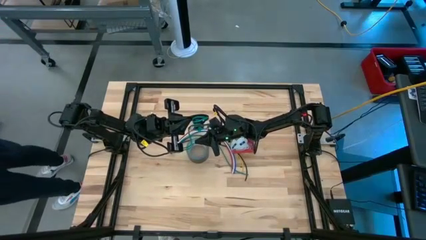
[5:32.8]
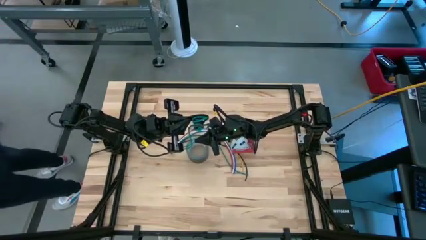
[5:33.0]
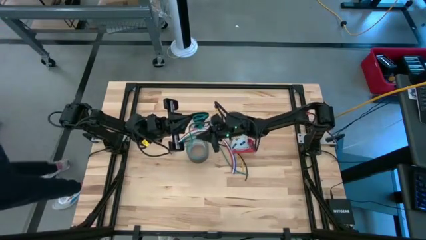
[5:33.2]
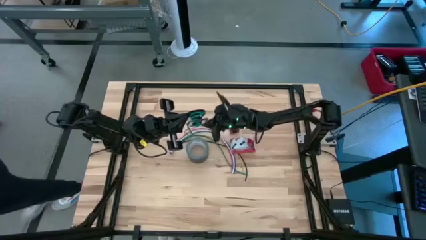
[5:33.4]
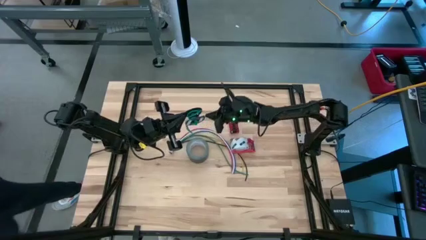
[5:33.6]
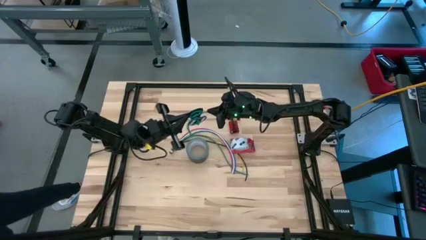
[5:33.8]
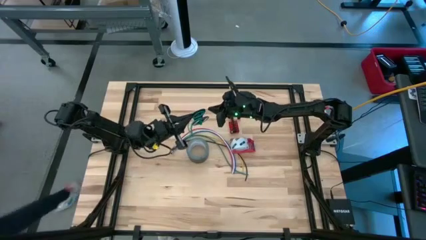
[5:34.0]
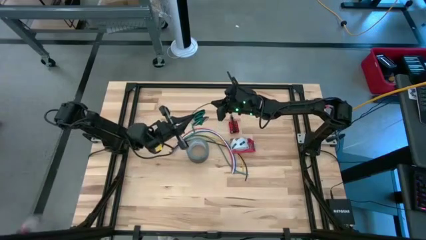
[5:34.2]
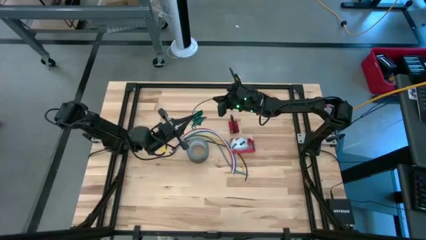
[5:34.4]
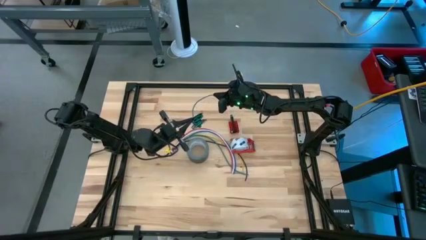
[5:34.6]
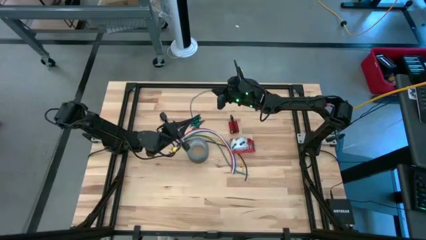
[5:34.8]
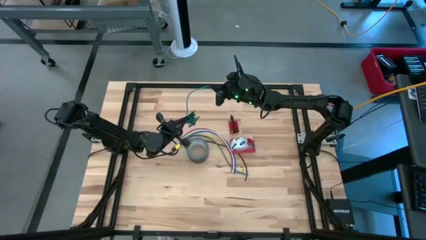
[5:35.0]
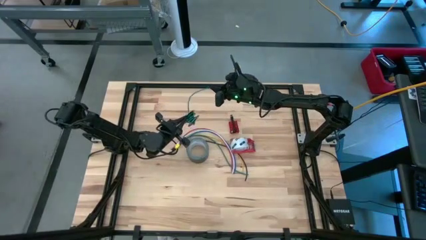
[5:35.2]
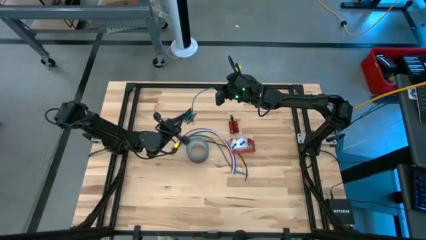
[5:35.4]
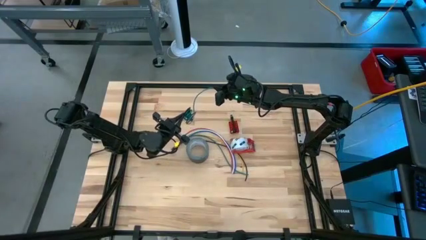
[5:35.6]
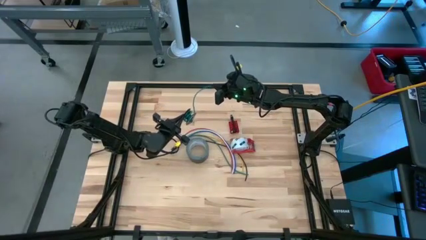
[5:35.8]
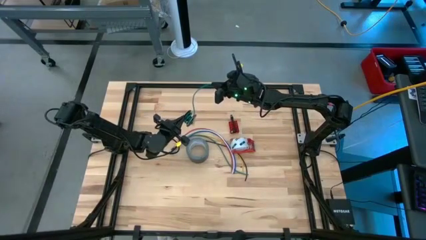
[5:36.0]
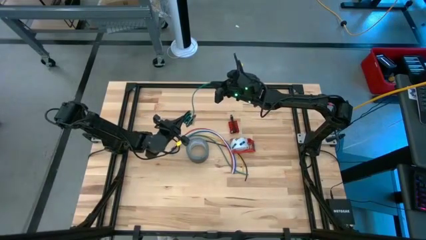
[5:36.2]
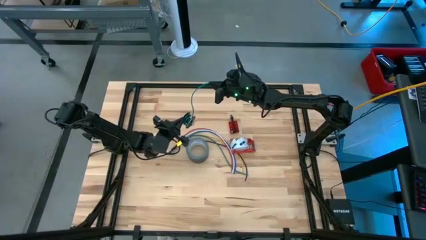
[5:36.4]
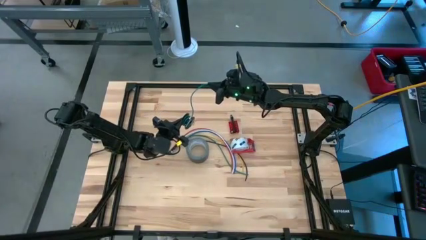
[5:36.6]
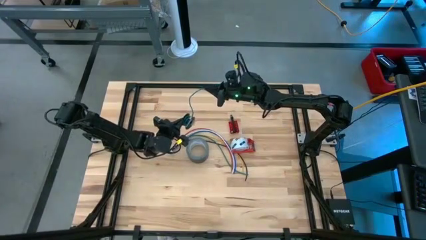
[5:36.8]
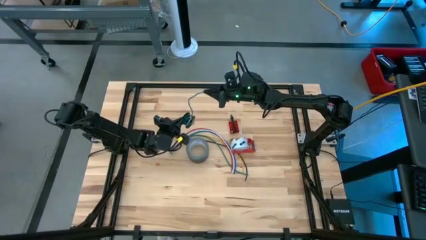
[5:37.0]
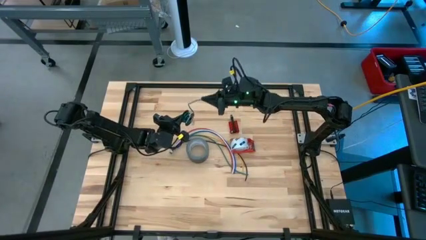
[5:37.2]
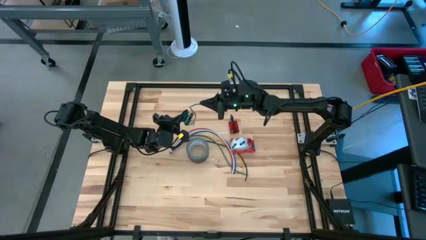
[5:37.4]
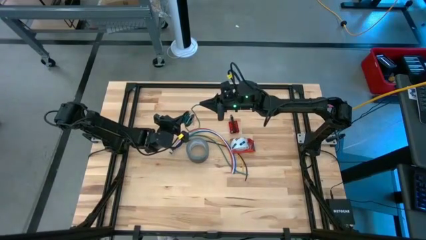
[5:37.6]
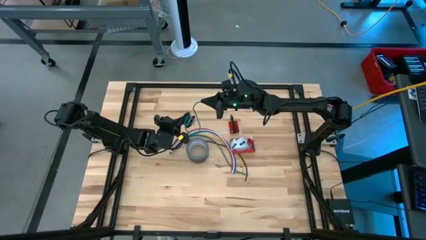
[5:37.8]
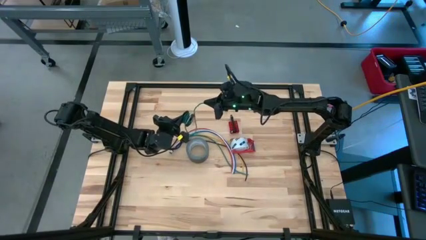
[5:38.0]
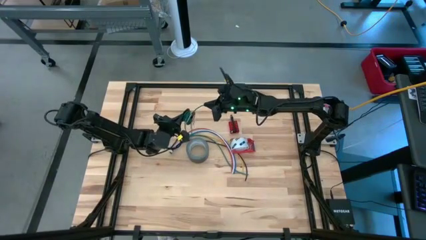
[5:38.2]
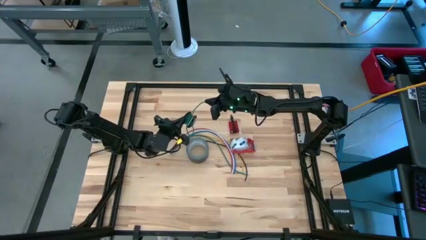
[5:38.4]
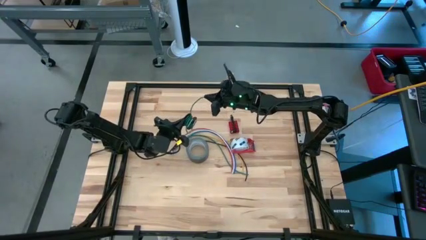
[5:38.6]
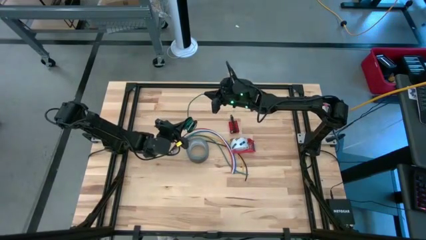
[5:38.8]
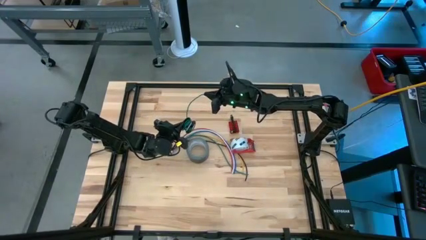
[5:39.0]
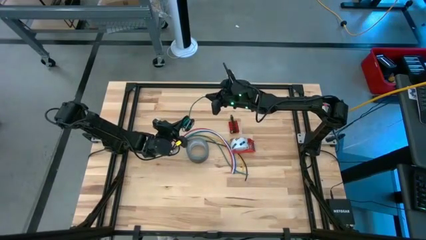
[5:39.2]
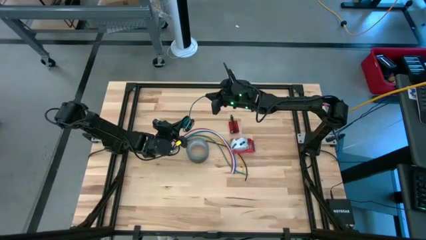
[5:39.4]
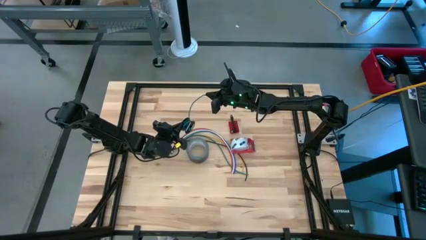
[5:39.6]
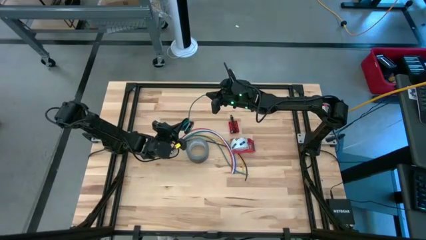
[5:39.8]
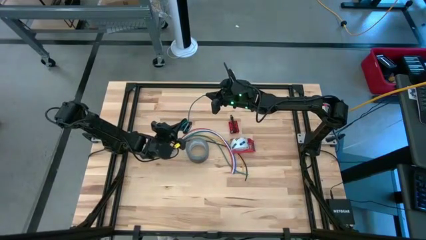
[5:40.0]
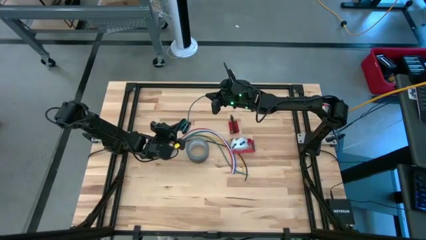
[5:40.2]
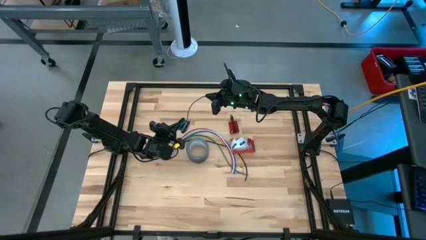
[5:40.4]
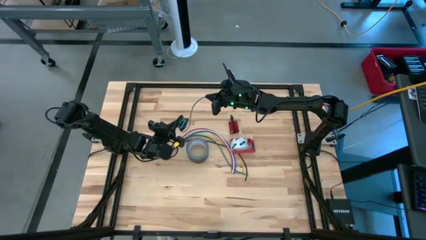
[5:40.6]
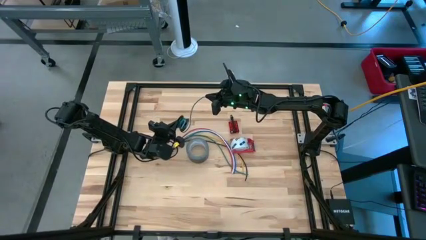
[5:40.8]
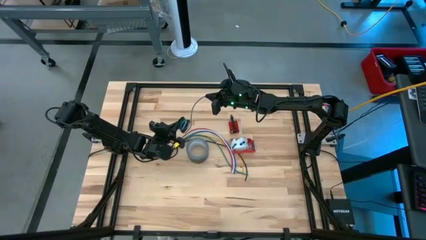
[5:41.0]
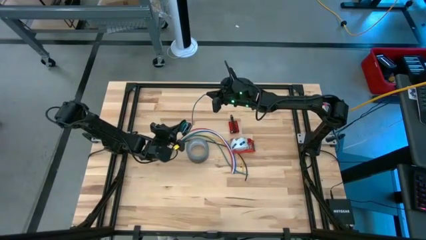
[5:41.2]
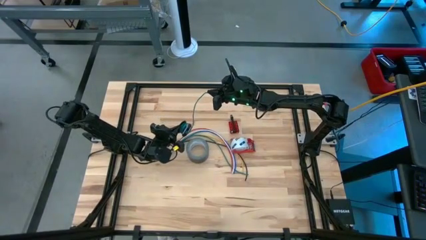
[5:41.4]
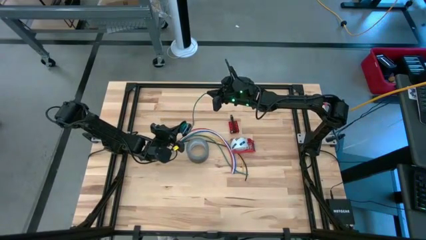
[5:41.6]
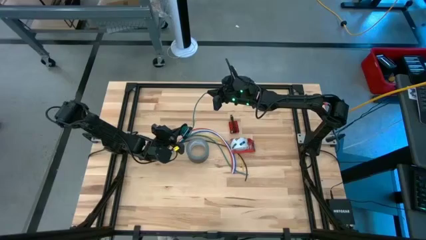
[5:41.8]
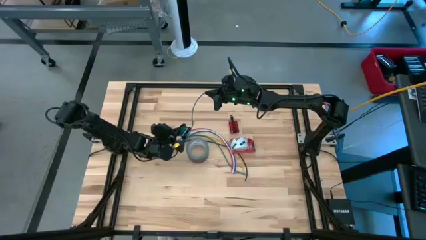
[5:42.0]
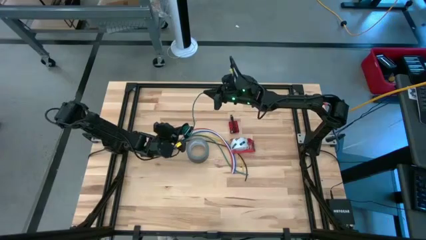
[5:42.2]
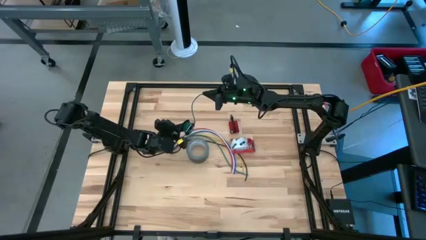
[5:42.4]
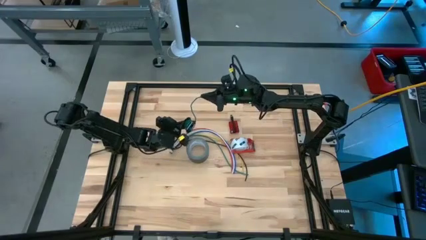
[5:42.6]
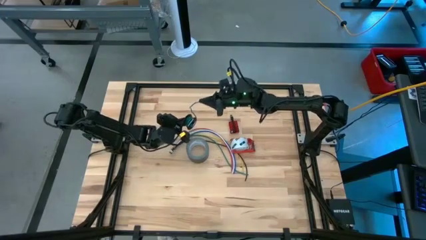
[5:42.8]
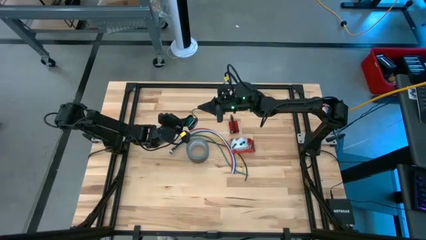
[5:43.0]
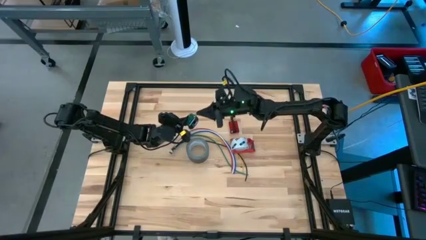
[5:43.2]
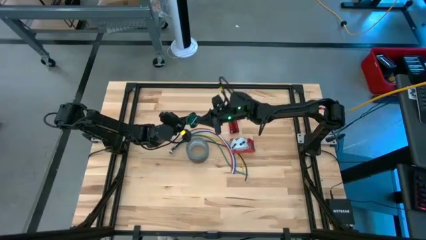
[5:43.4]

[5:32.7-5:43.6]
Task: Coil cords
Coil the green wire onto the black spool

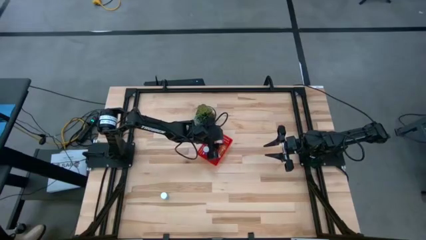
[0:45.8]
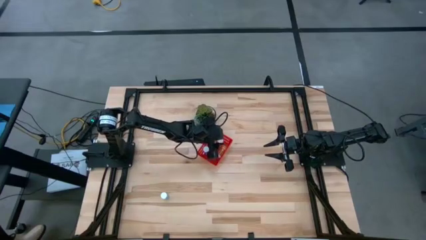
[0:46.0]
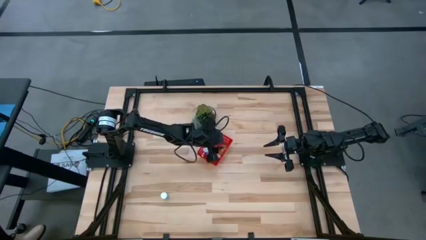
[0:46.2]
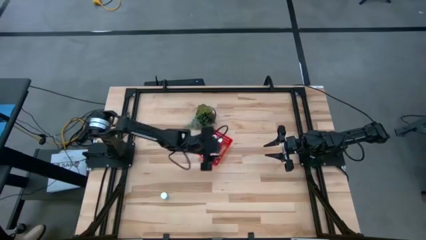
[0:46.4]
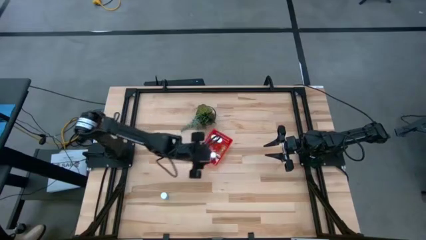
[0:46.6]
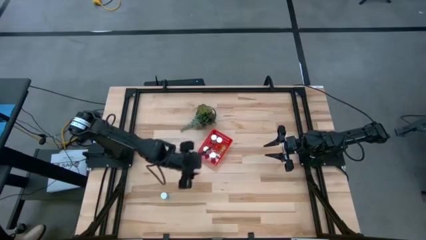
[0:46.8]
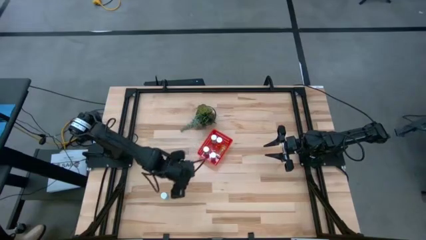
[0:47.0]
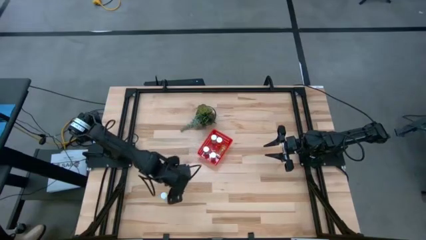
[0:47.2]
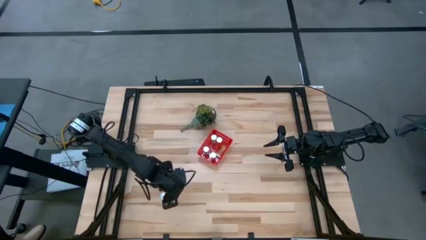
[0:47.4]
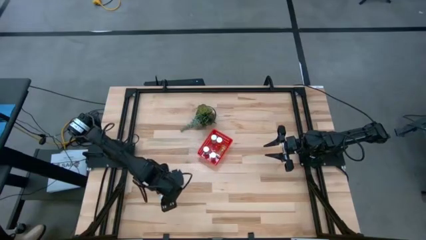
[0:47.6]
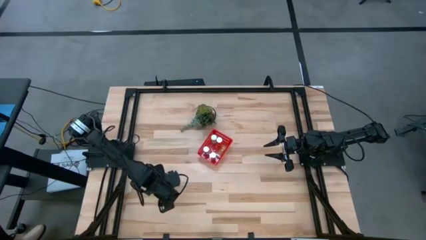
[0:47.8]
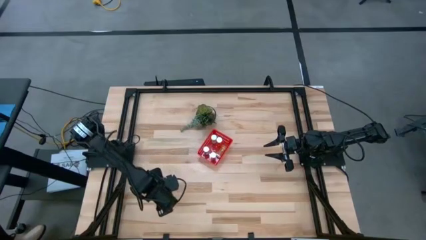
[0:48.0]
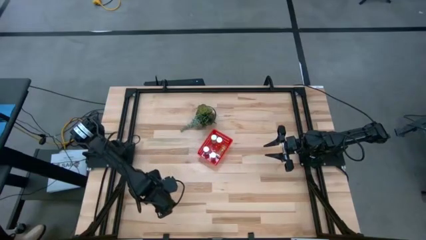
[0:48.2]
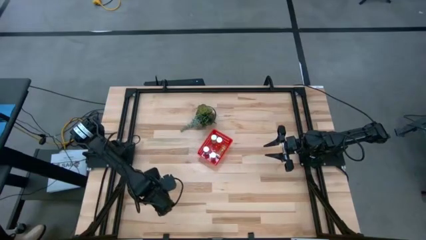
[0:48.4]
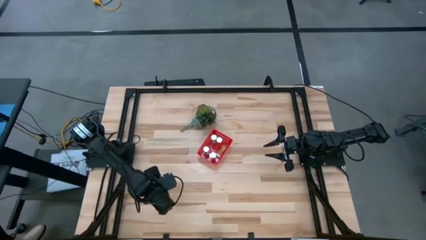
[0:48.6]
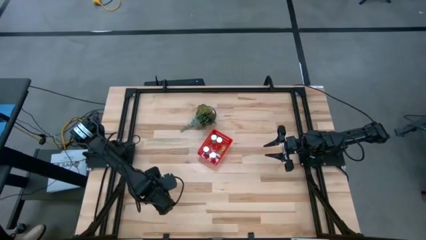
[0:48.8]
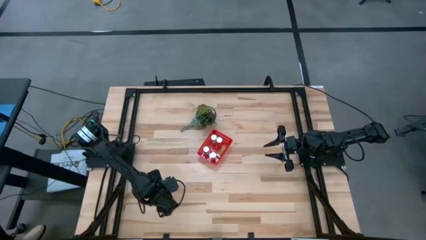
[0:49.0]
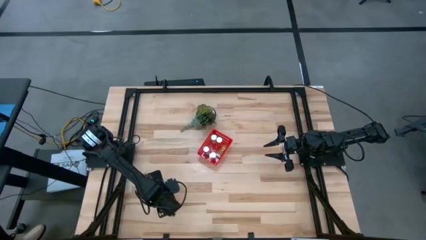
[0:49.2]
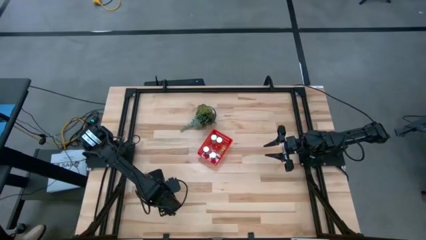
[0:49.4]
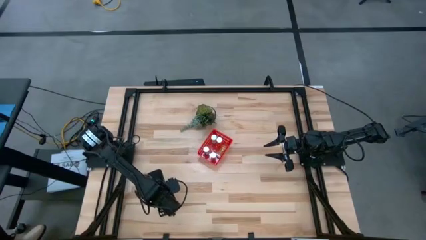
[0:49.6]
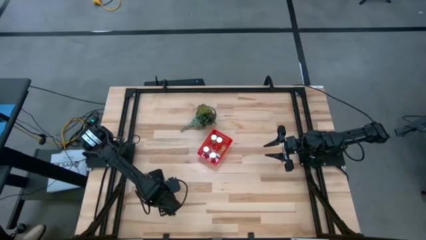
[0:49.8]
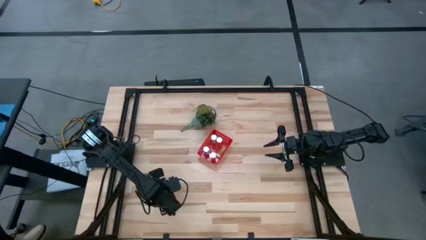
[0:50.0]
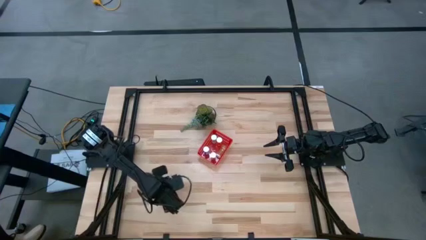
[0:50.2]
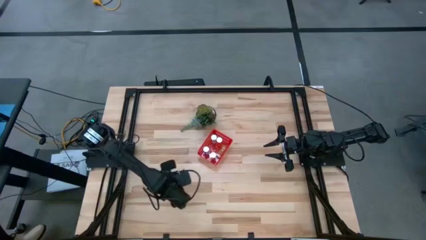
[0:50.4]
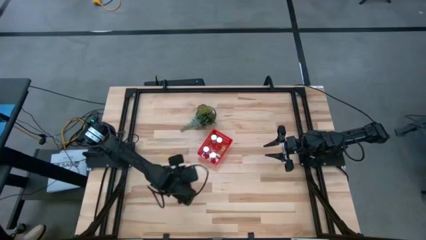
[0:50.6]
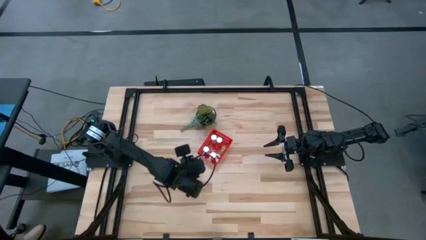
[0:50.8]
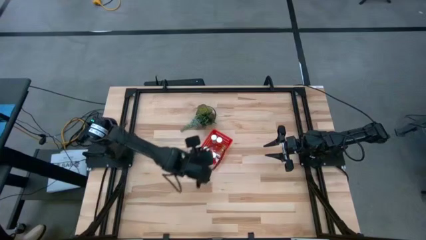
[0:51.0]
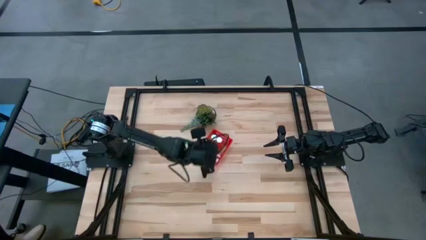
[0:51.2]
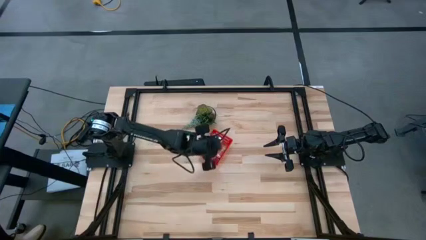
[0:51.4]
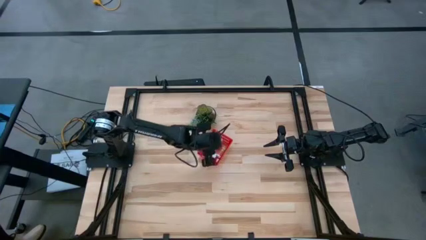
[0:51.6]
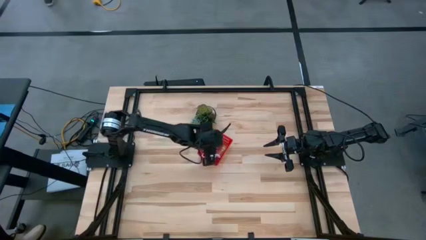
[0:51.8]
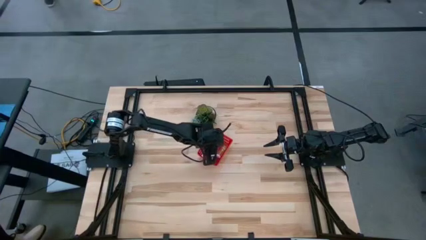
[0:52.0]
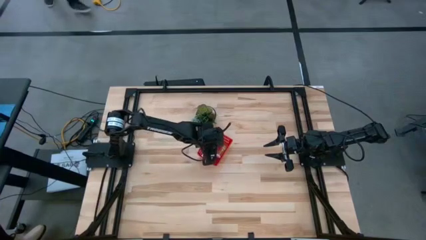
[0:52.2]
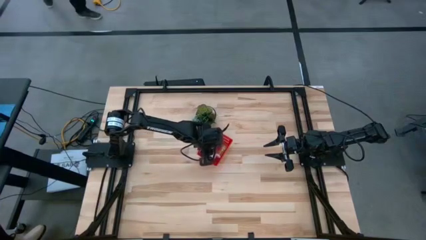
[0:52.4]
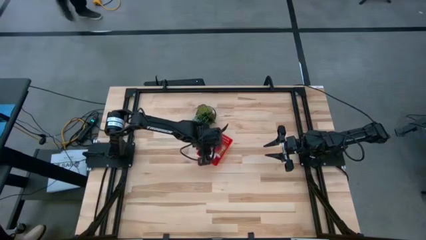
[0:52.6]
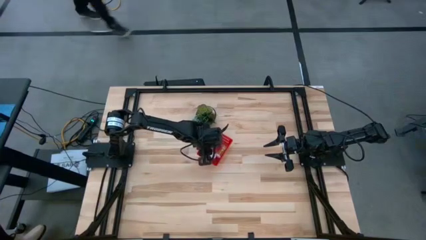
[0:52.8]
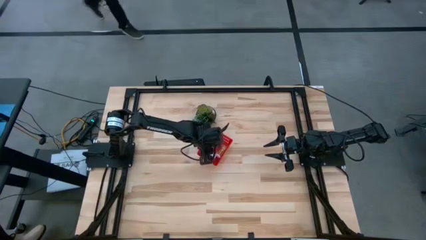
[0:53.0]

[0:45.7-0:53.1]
Task: Pick and place pill bottles into a basket
Put the blue pill bottle into the red bin
